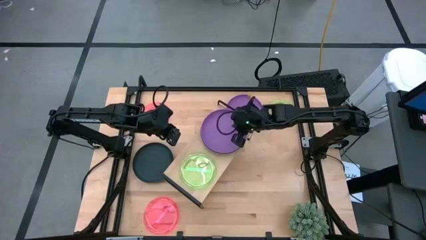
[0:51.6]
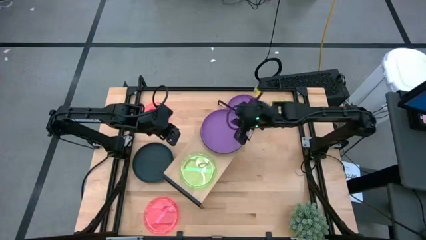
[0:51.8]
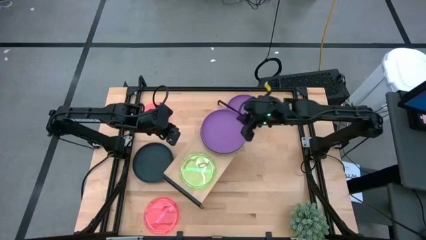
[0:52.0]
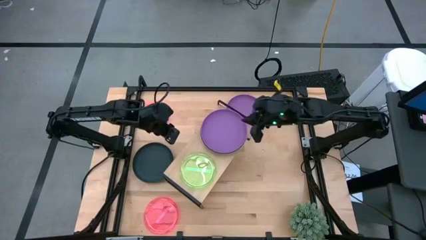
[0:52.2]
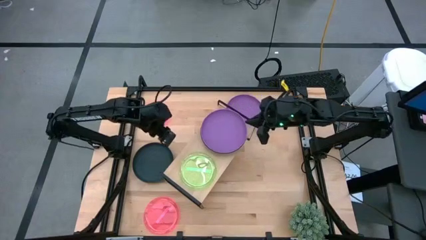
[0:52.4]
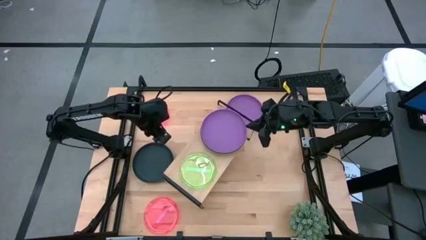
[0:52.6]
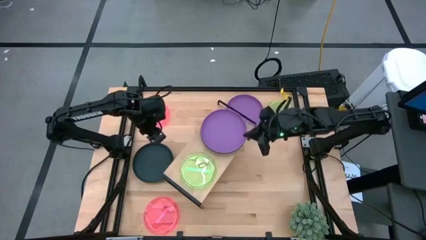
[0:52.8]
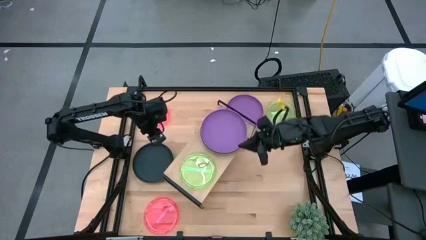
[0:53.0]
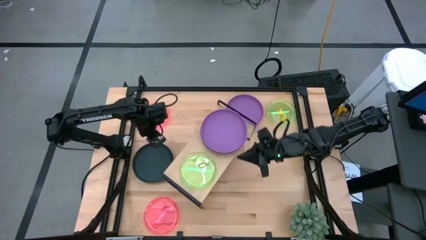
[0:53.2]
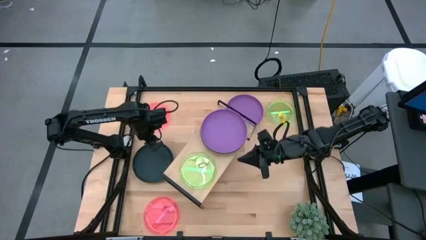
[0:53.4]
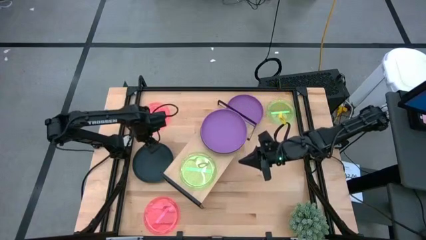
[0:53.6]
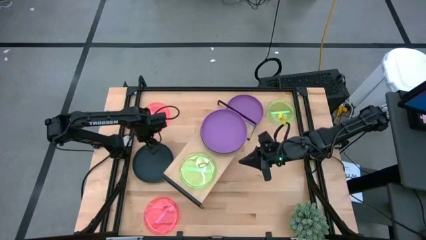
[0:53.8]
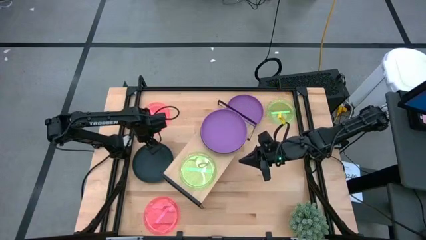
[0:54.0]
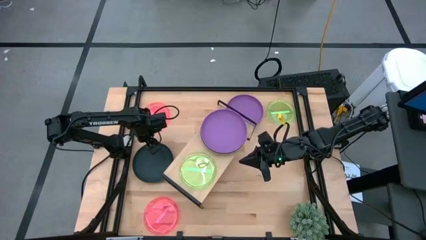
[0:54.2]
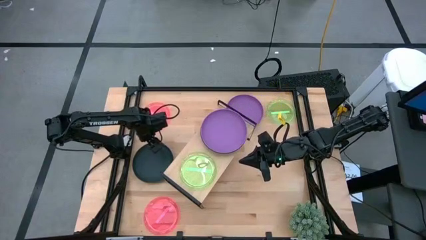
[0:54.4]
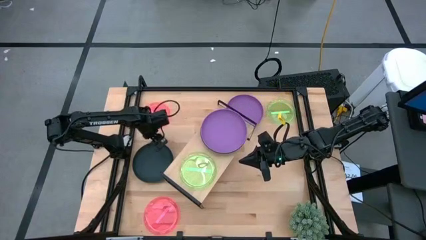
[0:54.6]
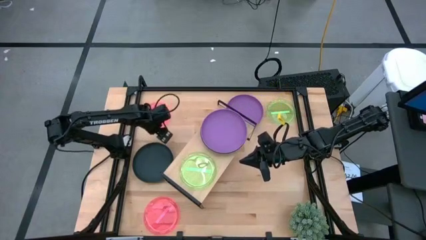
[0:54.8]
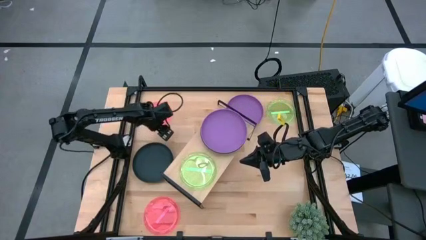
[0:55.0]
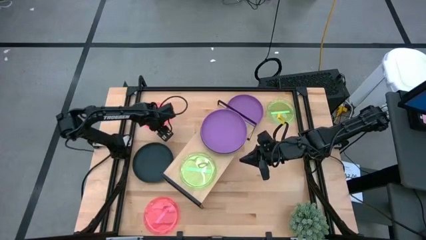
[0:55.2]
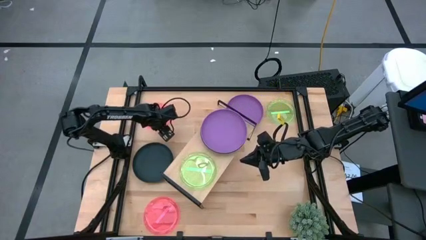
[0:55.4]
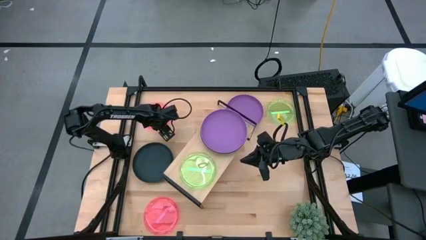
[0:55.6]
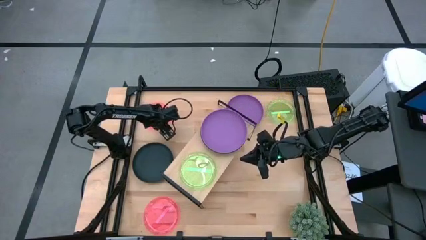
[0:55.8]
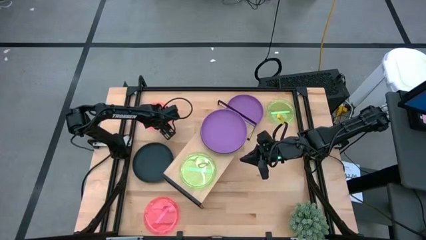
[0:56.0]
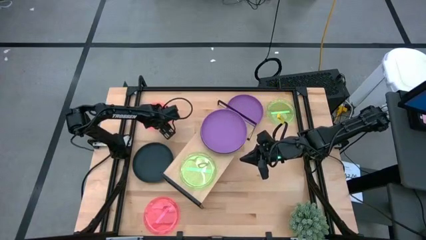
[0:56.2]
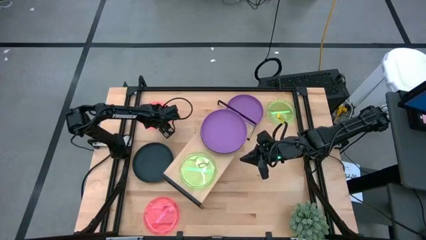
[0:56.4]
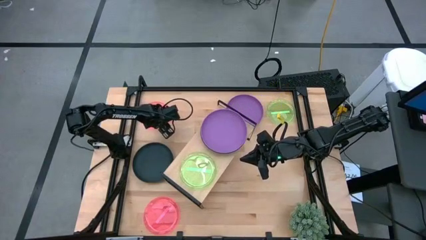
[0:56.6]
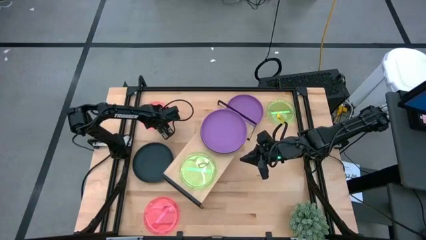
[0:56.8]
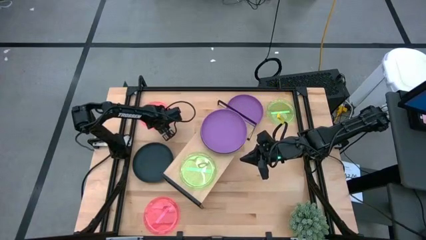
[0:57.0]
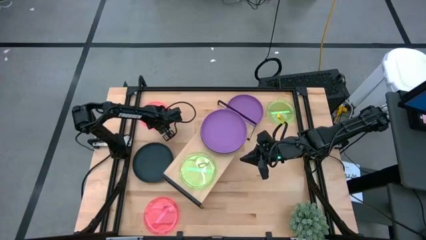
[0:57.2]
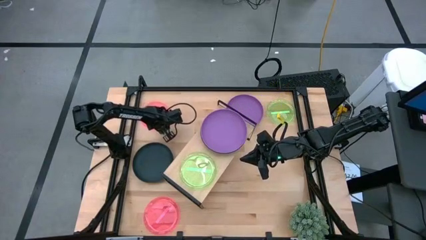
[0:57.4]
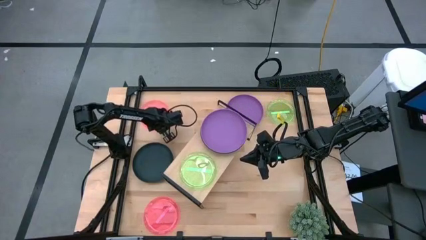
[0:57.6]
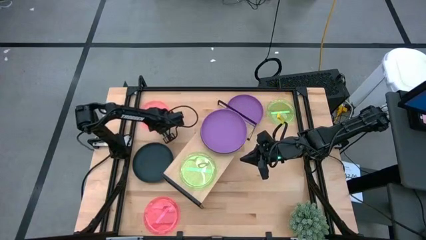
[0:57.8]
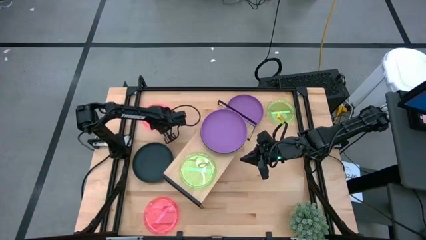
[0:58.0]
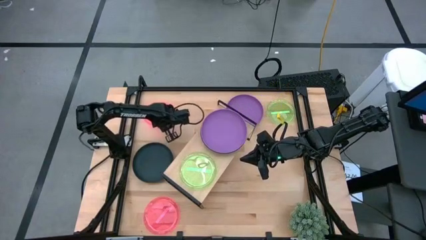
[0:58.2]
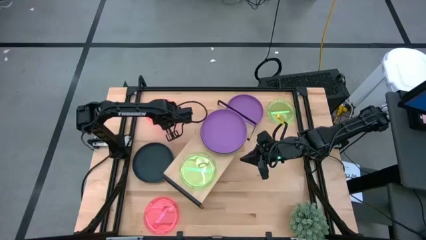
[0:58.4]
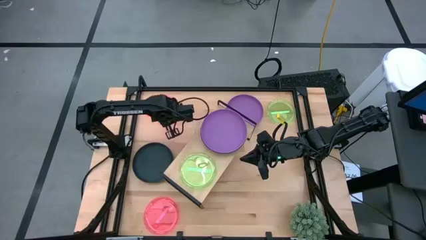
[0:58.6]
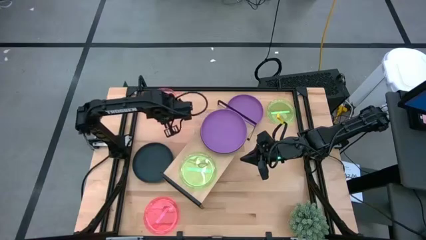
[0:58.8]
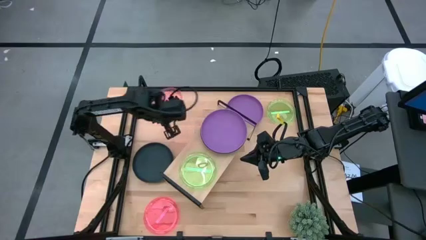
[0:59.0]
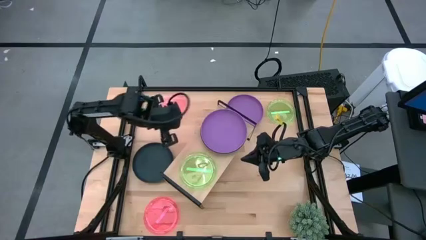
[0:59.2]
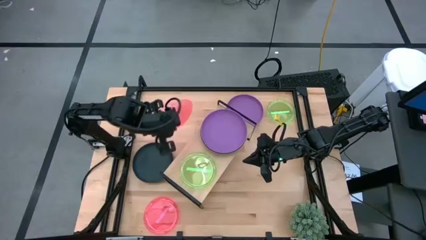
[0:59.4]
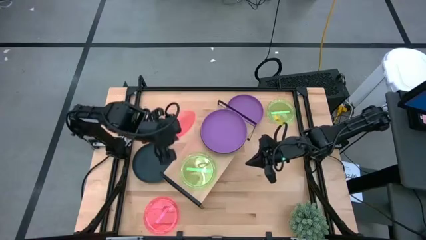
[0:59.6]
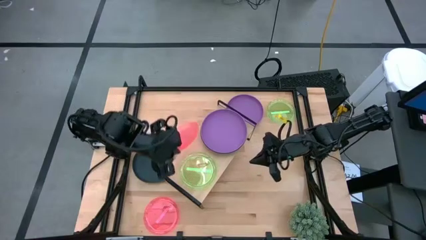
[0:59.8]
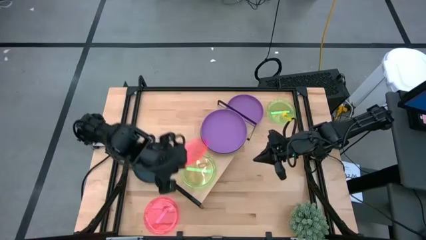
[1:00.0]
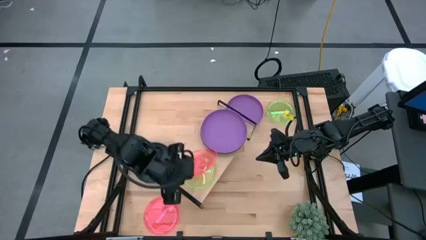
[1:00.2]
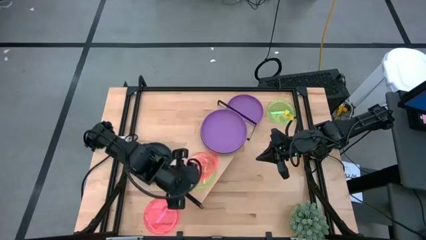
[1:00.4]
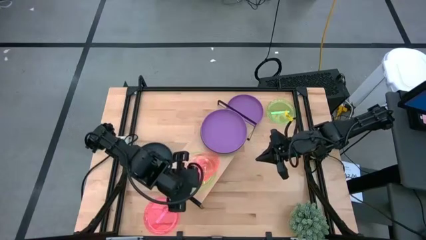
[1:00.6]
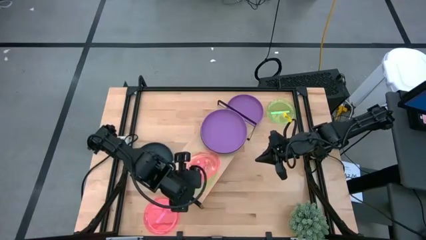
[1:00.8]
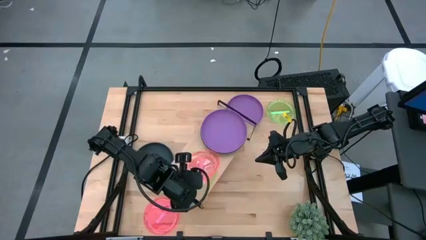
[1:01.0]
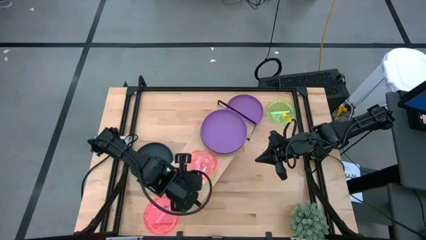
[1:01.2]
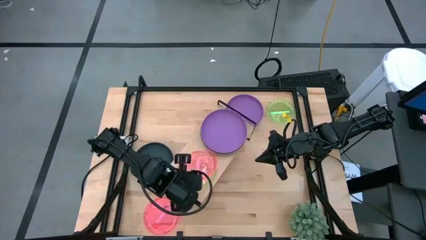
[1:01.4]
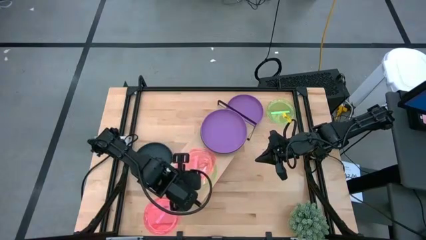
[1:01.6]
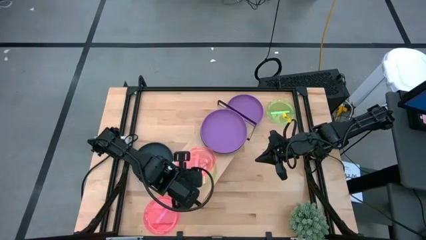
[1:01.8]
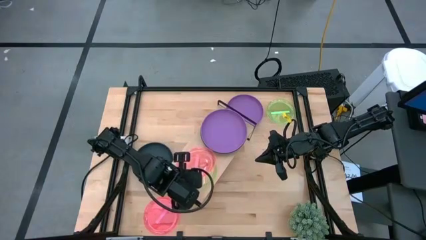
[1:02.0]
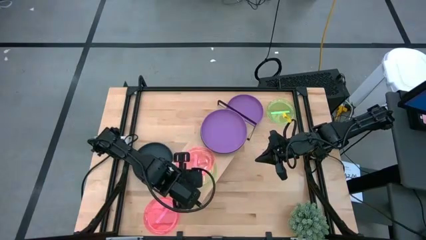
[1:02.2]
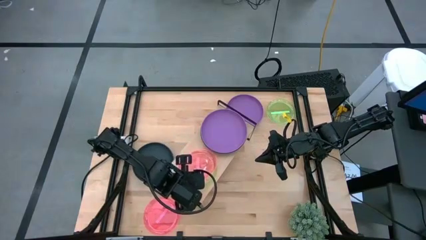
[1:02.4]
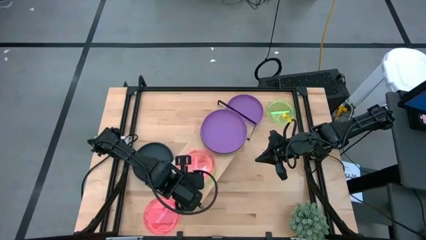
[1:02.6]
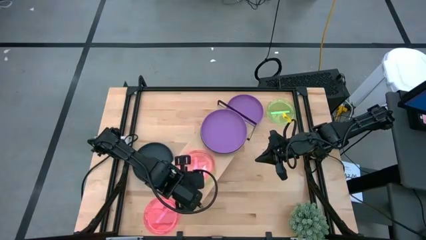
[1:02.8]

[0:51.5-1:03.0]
Task: Place and stack plates onto a shelf
Stack the top pink plate on top of the green plate on the shelf

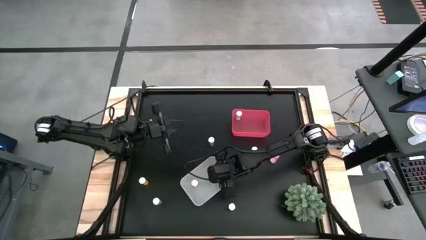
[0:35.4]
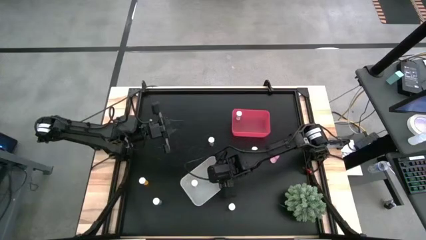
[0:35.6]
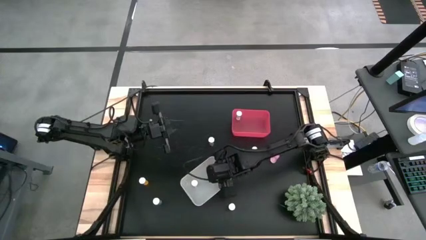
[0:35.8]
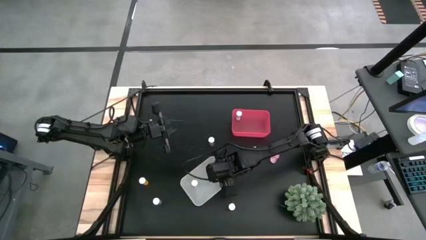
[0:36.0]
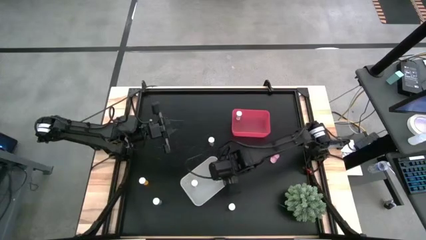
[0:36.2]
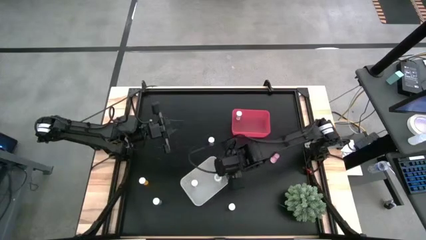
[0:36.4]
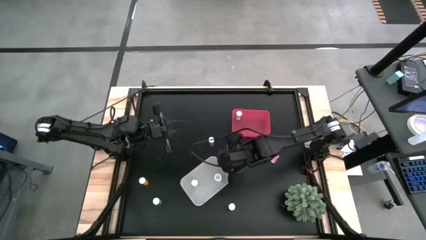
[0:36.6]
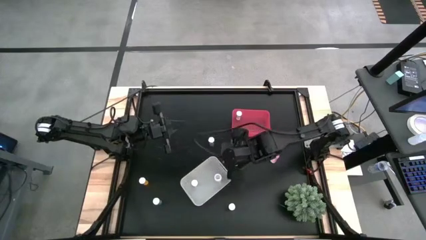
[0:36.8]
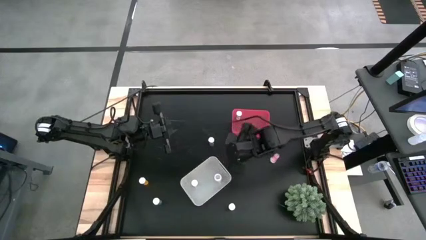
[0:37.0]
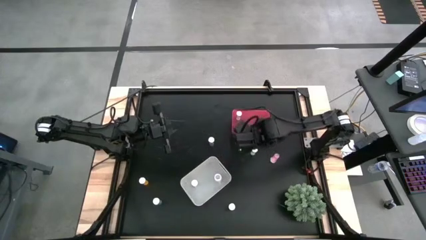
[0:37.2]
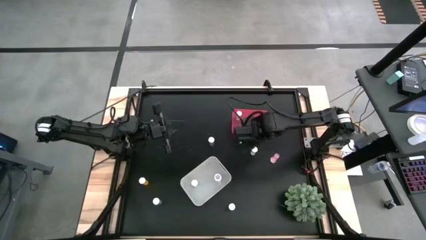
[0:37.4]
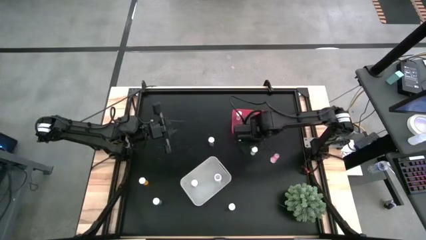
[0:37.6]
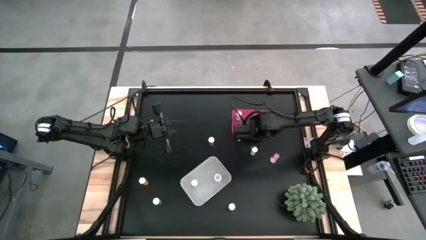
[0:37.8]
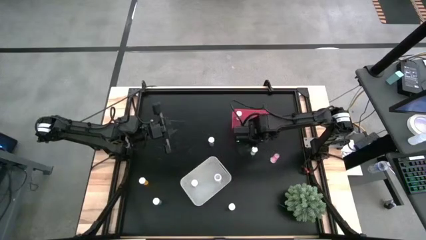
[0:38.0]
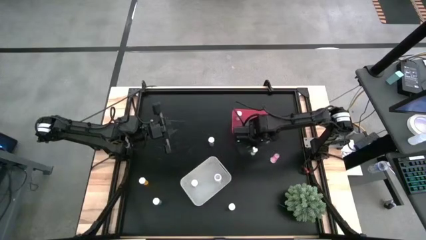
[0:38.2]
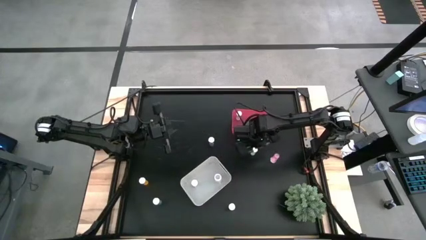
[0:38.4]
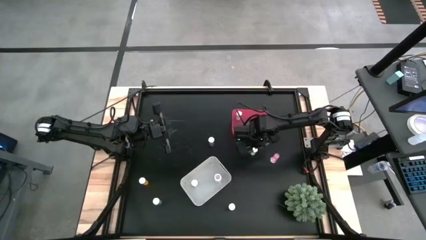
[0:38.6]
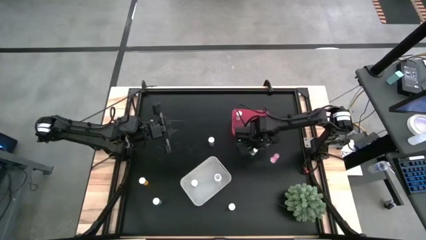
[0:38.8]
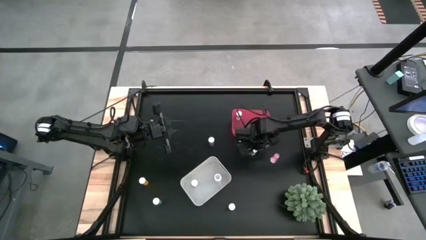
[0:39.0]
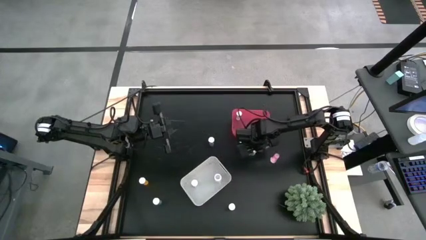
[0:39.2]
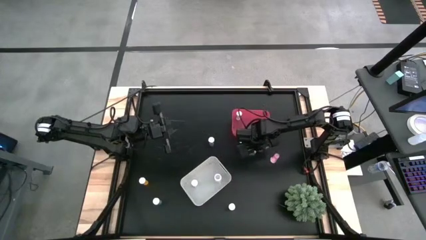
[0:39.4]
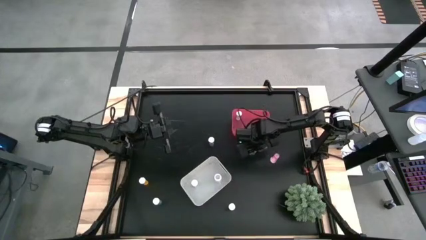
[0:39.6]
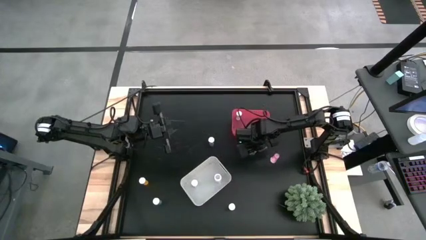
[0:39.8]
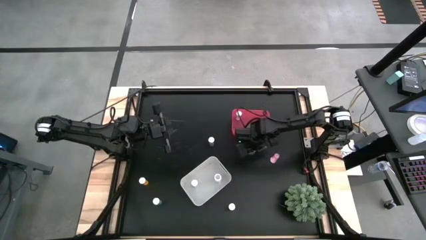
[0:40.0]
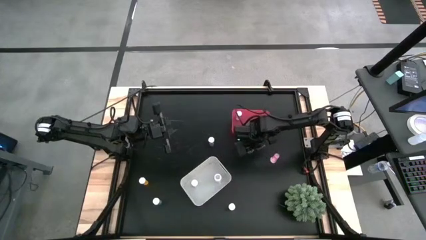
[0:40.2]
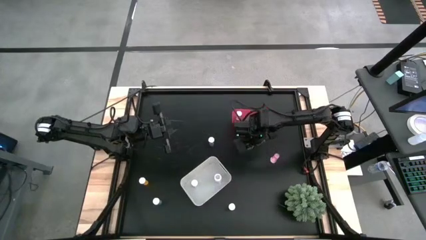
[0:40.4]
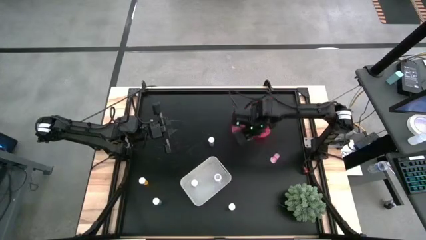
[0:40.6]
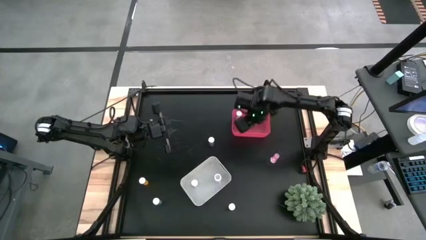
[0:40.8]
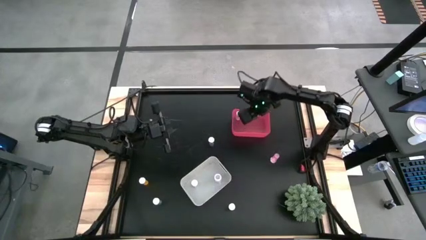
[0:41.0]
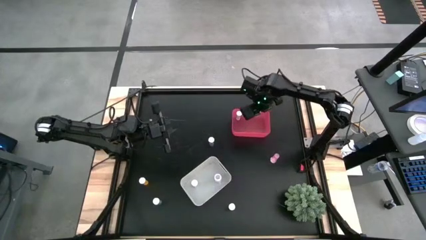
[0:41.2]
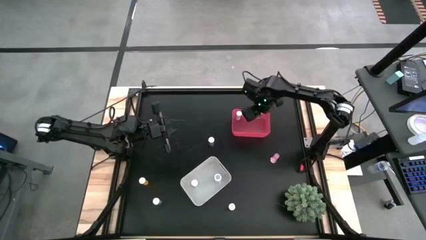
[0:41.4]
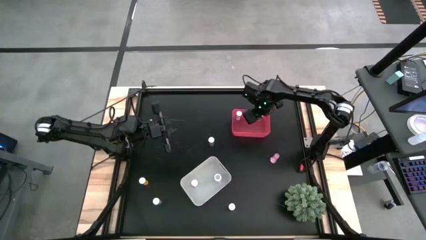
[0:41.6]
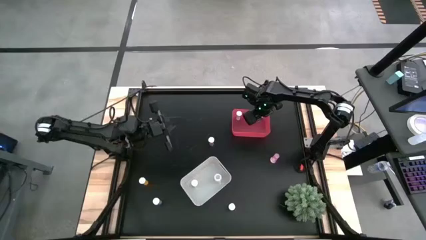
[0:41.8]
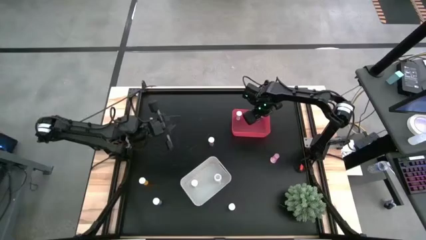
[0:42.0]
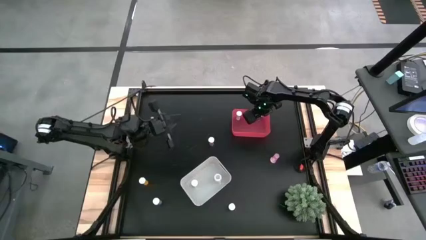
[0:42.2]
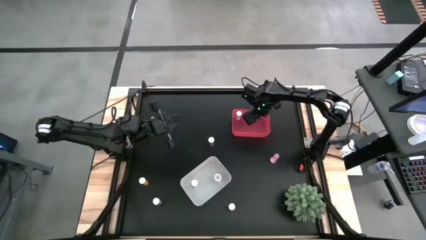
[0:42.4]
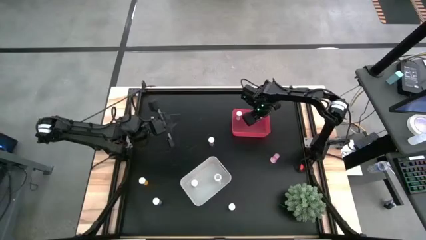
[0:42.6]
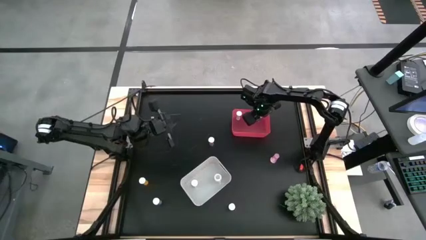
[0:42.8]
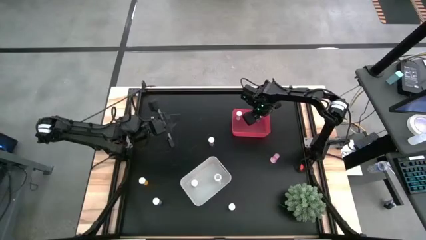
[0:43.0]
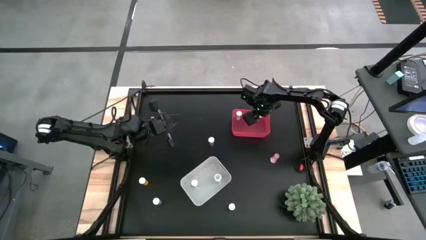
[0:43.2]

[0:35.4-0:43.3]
Task: Pick and place medicine bottles into bin by pill shape (circle, oval)
Put the blue tablet bottle into the red bin
